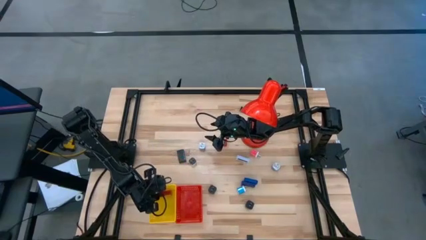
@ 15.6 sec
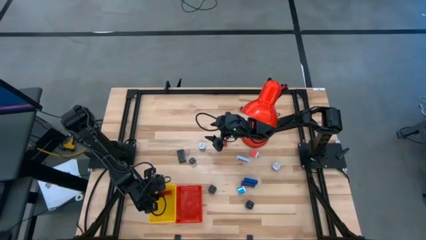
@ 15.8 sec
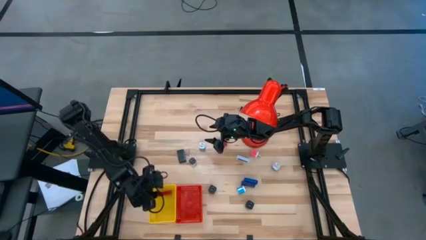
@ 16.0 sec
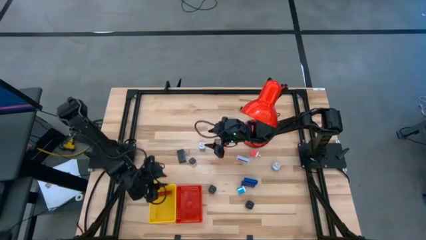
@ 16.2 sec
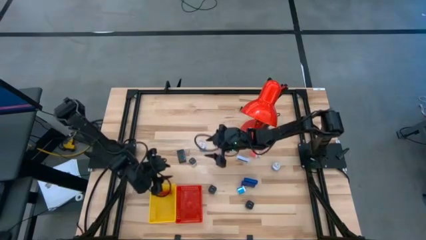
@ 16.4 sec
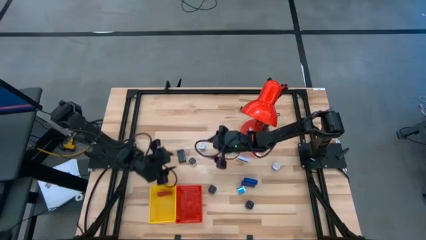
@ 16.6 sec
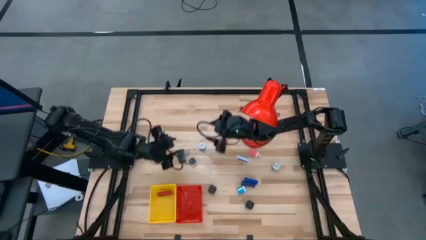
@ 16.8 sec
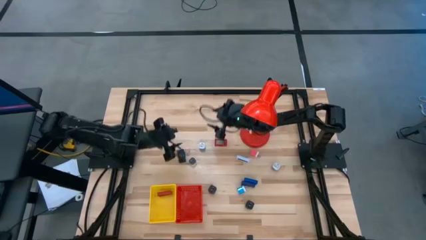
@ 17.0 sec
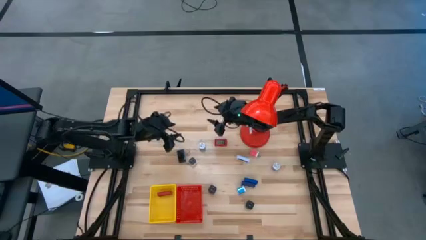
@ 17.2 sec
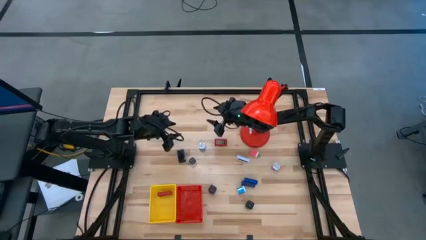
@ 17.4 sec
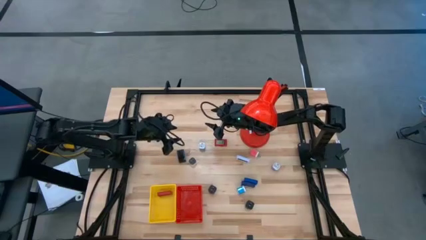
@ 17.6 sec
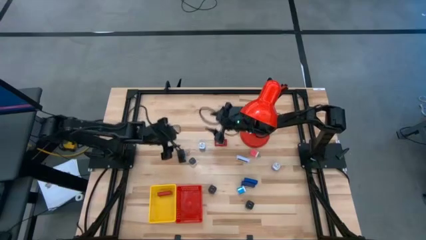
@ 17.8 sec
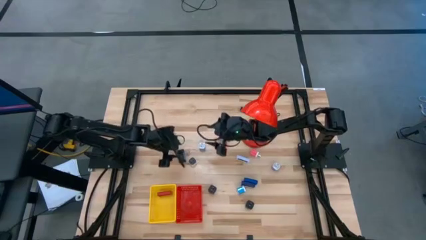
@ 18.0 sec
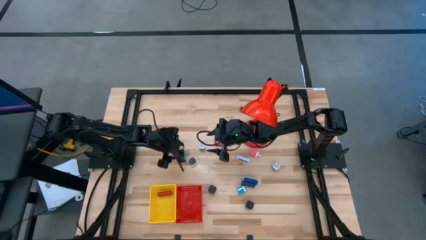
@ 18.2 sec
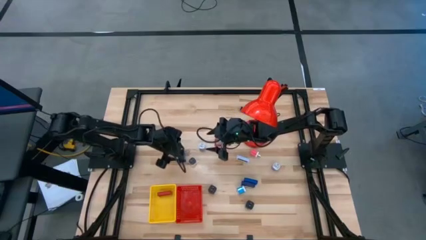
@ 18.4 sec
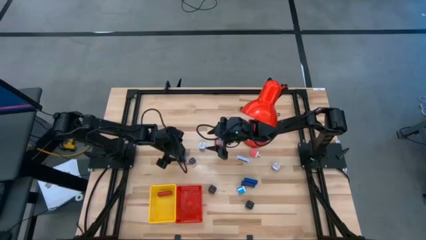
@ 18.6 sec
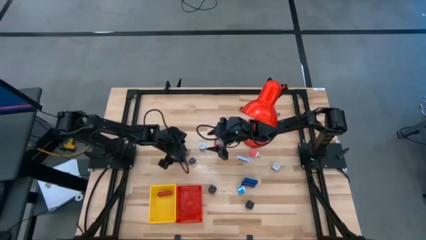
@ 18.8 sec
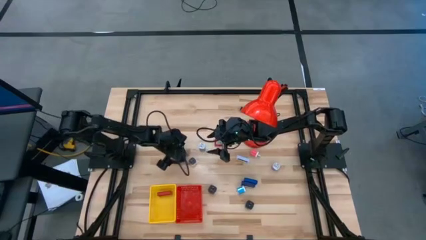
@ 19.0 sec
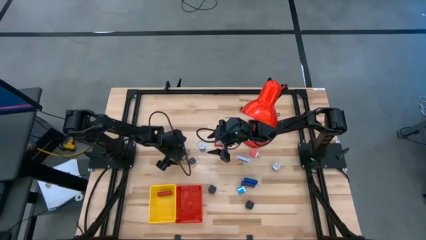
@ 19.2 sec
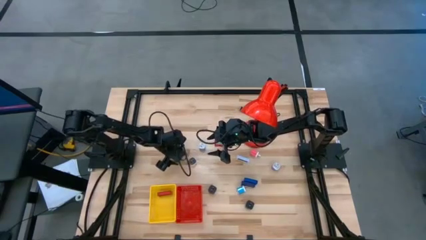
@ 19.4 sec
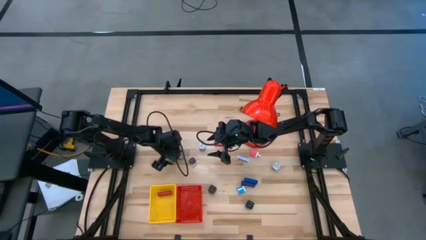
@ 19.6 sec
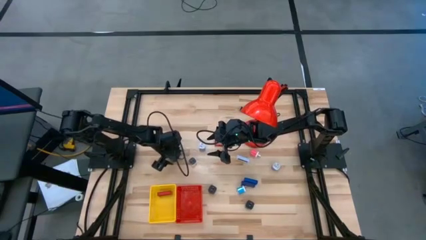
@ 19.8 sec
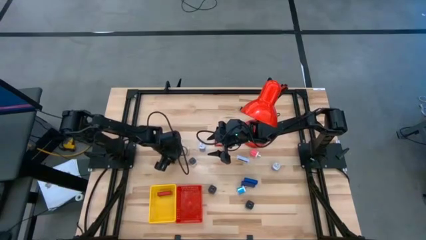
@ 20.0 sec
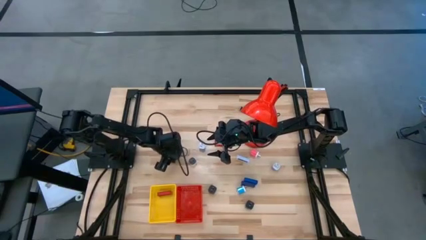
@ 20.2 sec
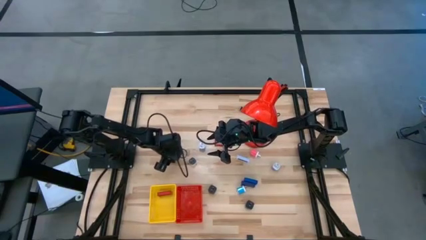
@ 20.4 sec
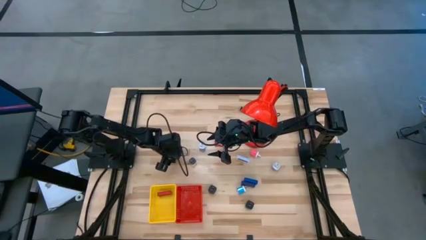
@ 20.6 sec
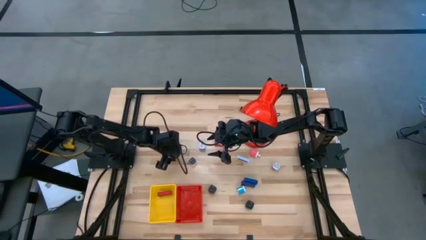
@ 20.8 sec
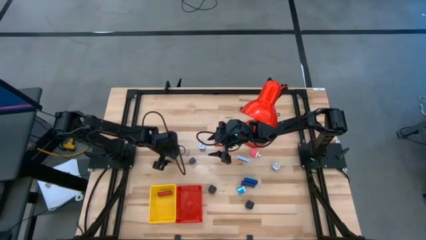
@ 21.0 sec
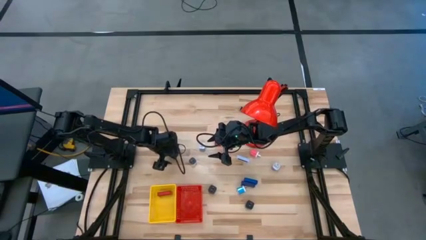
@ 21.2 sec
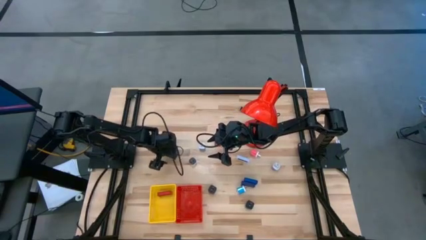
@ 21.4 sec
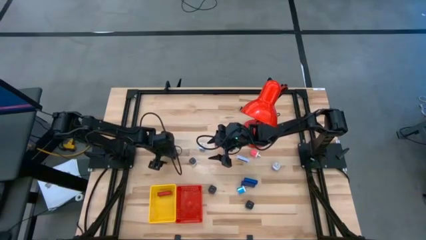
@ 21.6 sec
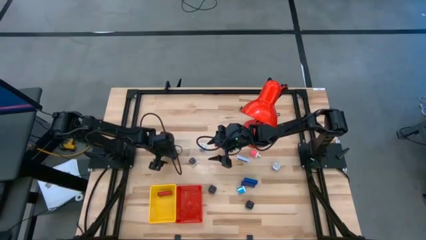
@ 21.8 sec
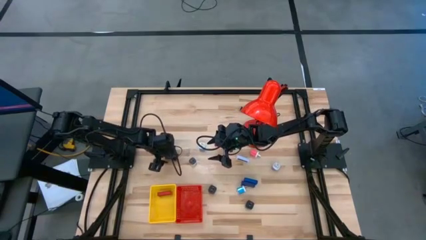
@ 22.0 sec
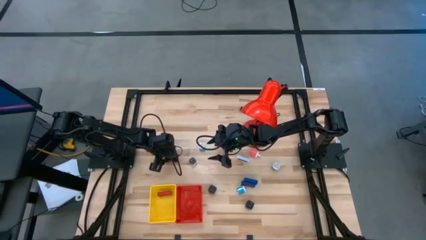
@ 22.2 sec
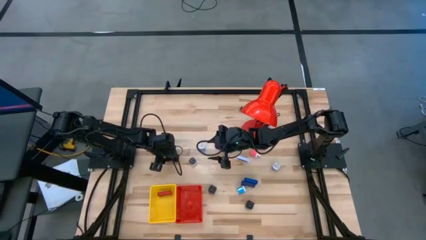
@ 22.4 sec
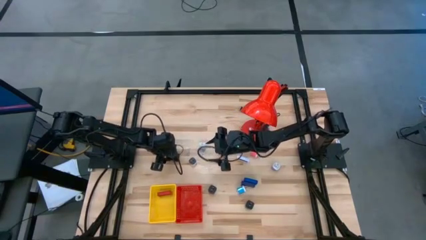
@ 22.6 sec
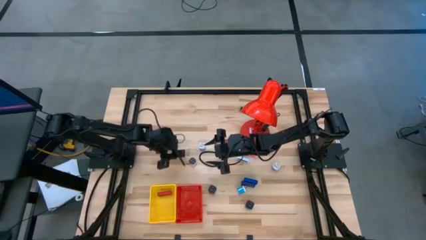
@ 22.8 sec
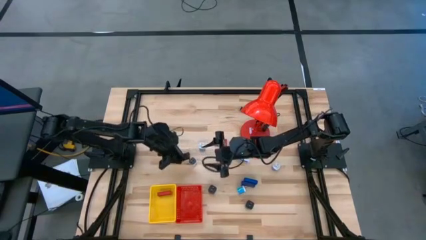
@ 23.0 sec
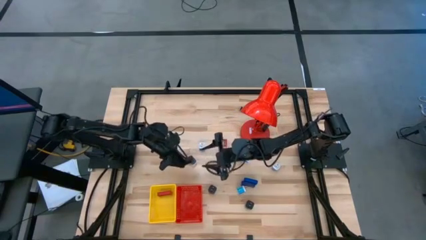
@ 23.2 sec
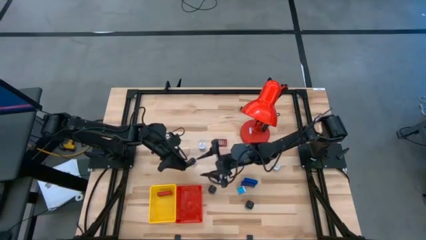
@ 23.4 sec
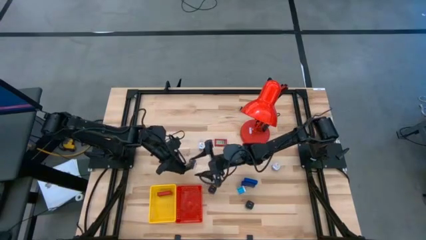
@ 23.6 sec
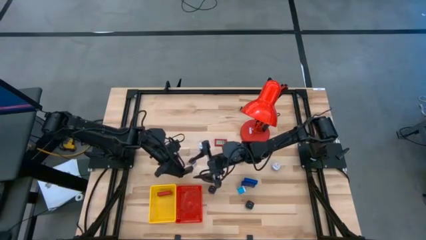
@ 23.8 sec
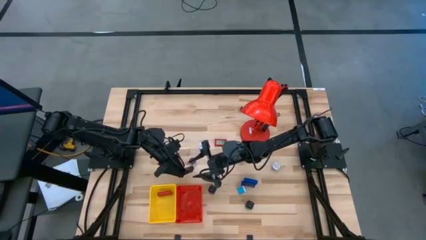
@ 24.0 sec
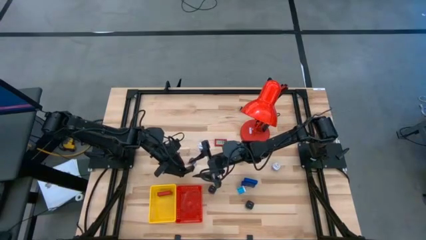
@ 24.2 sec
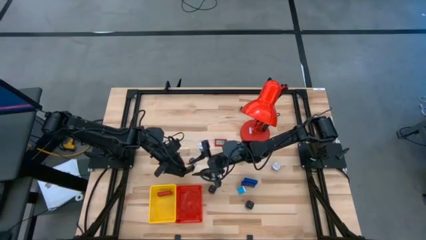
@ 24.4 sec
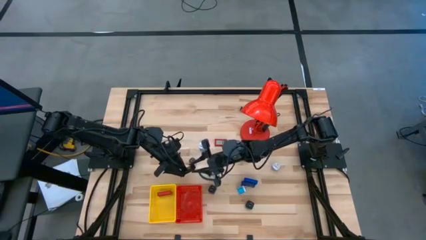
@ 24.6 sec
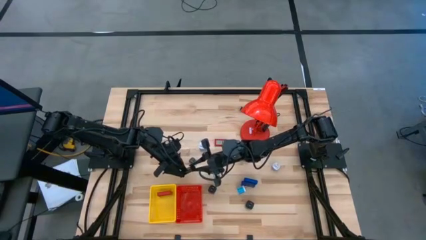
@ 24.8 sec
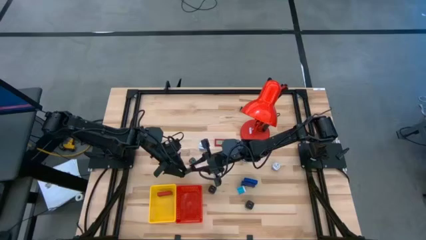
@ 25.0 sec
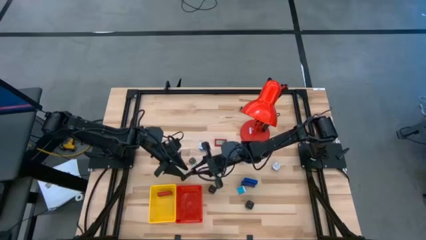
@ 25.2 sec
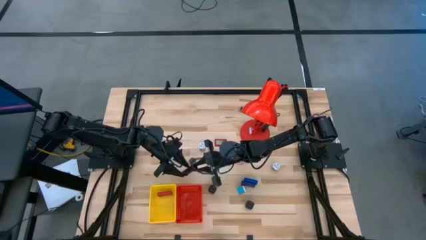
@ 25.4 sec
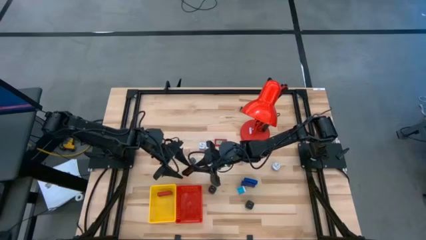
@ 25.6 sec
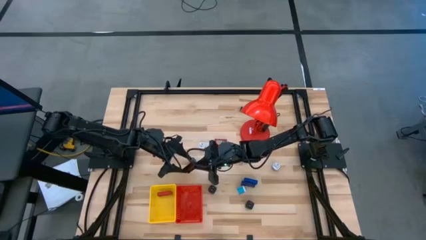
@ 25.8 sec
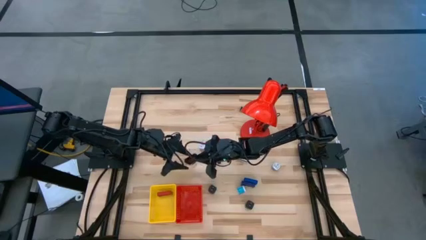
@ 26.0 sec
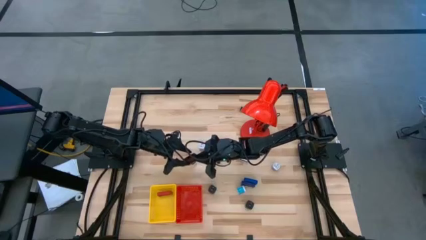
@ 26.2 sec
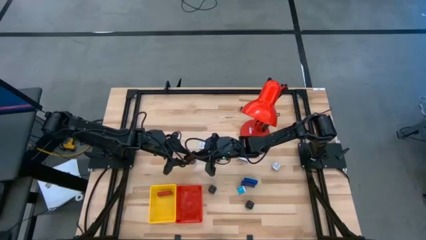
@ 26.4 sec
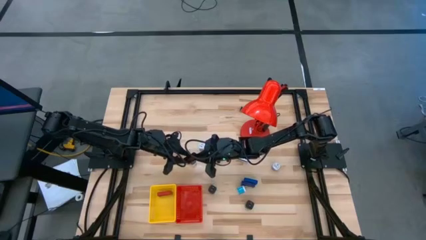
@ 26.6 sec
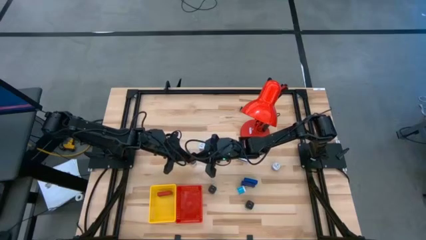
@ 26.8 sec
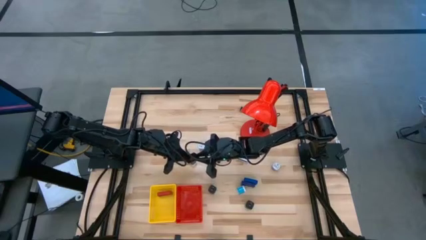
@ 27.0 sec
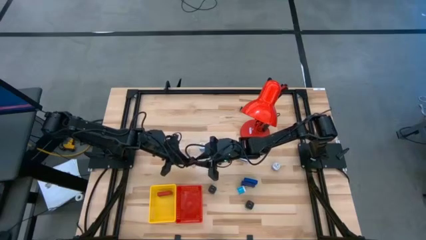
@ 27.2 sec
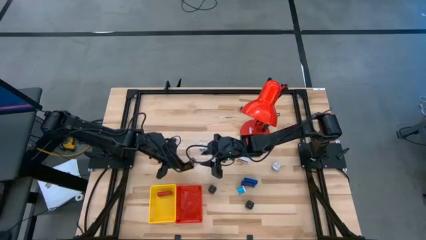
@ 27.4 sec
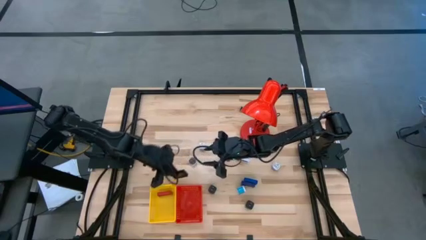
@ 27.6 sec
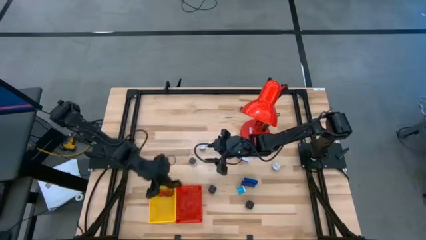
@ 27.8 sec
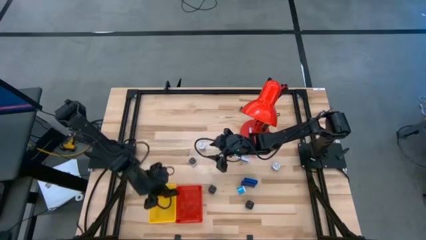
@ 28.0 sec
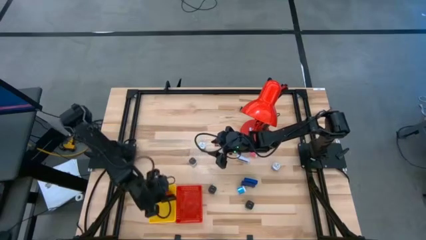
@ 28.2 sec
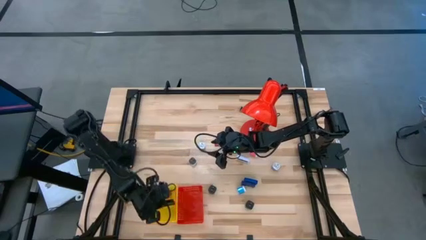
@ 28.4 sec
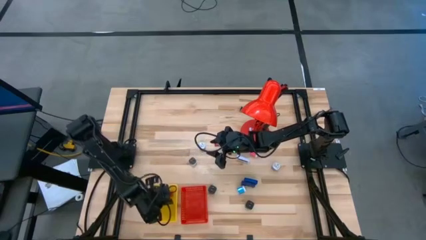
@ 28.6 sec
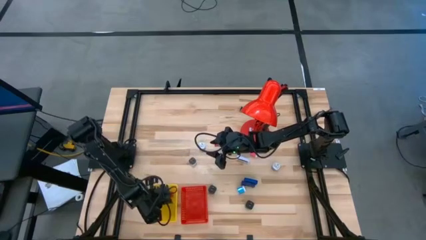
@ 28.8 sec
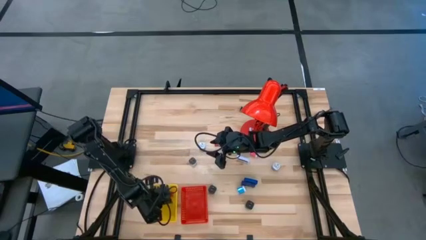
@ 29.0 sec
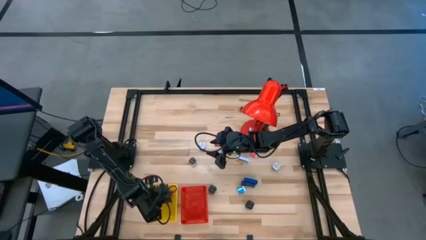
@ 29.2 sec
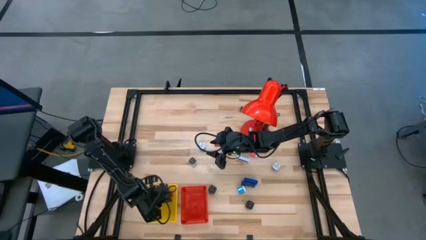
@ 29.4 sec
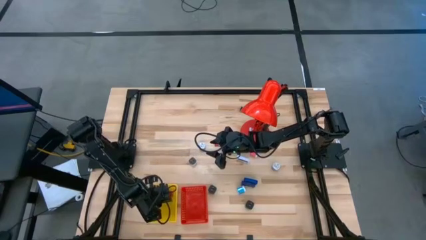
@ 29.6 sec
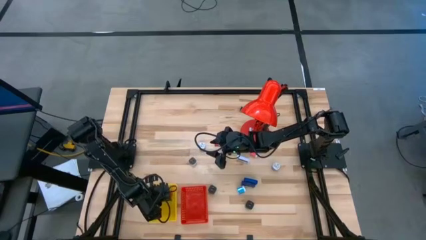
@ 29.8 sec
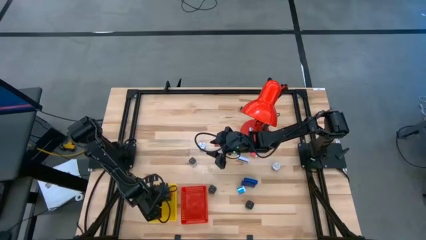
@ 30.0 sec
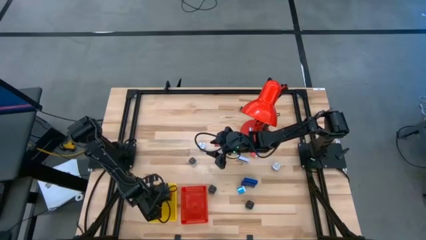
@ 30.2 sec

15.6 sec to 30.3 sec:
Task: Pick & Place Office items
Put the left black digital clock into the yellow bin
